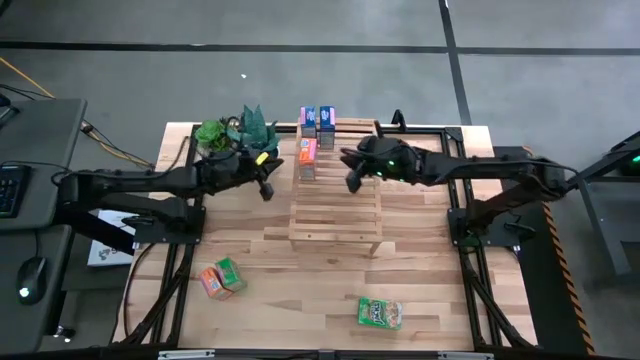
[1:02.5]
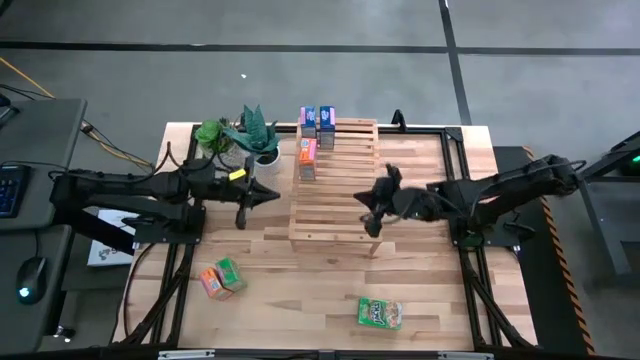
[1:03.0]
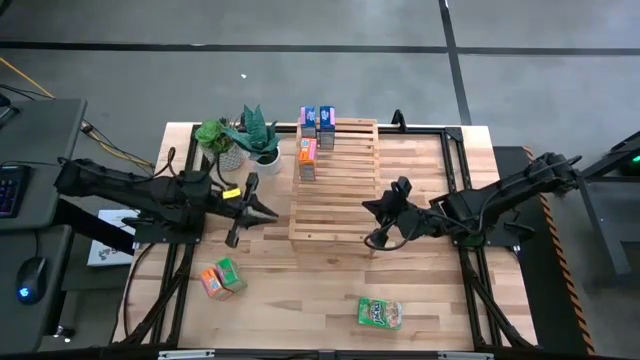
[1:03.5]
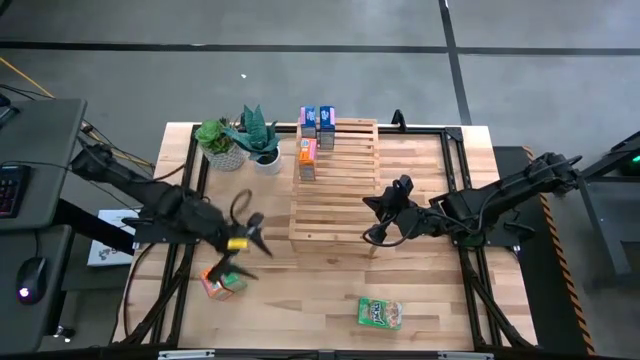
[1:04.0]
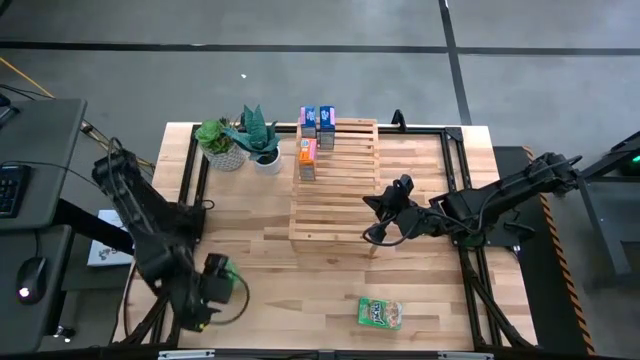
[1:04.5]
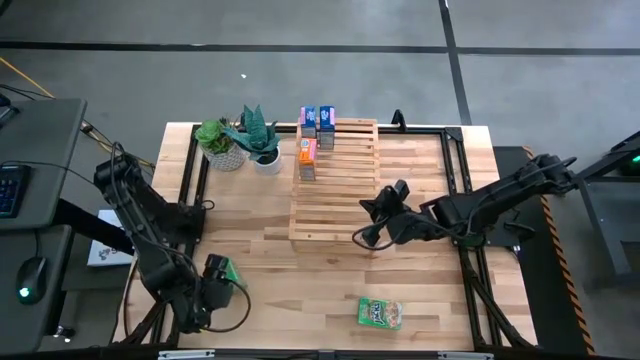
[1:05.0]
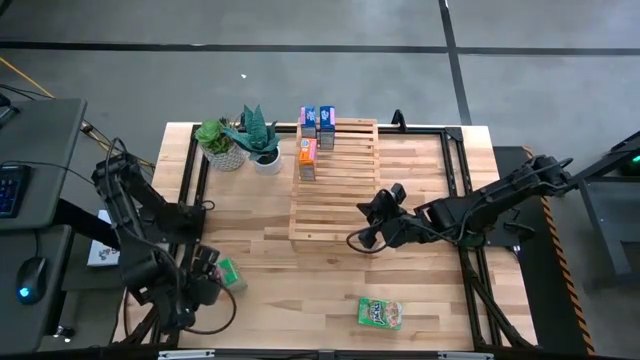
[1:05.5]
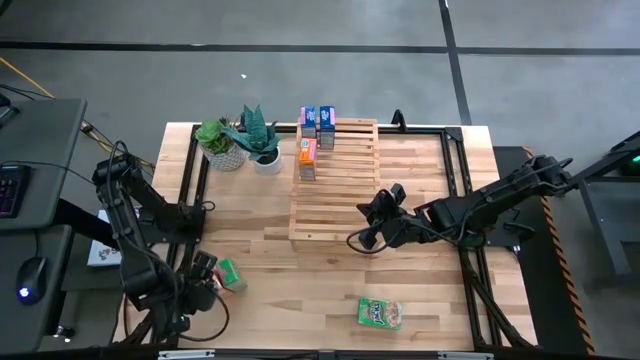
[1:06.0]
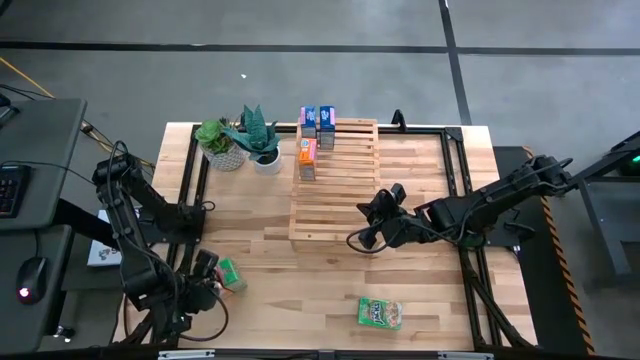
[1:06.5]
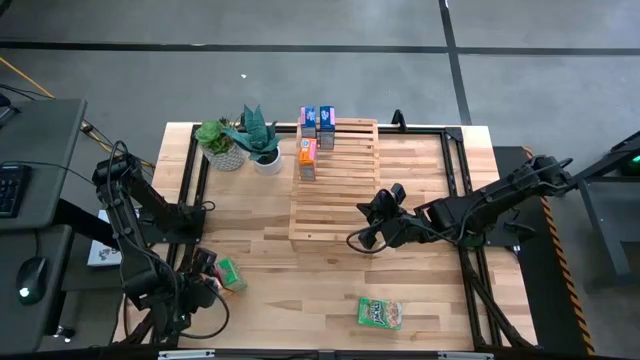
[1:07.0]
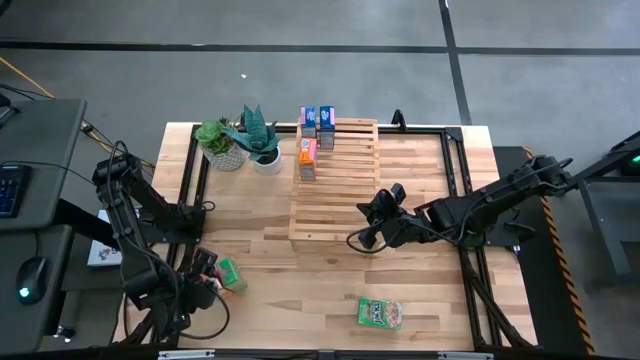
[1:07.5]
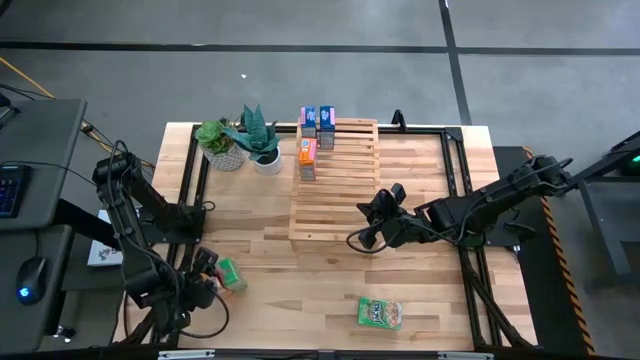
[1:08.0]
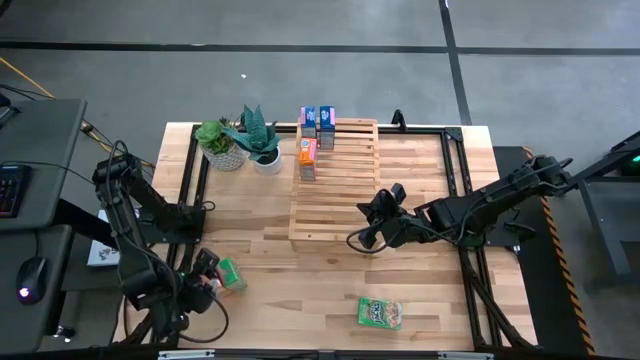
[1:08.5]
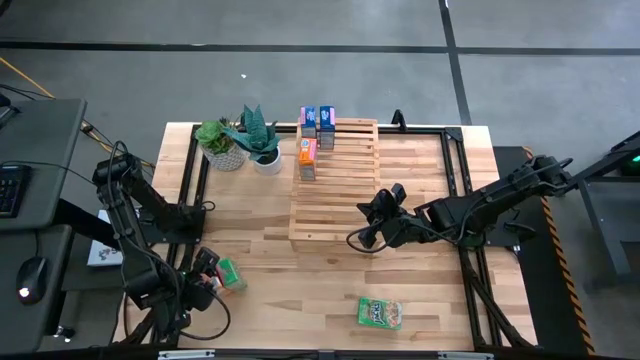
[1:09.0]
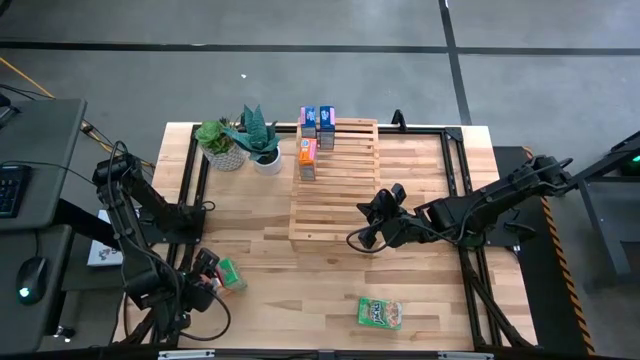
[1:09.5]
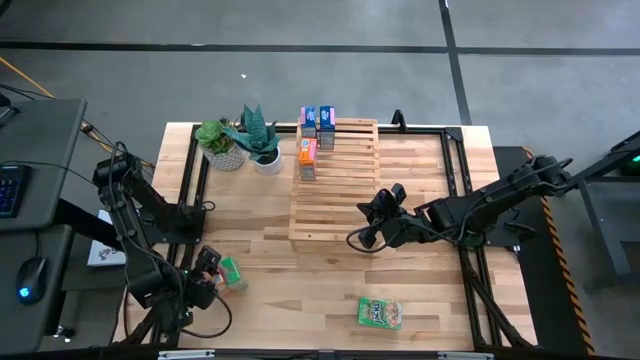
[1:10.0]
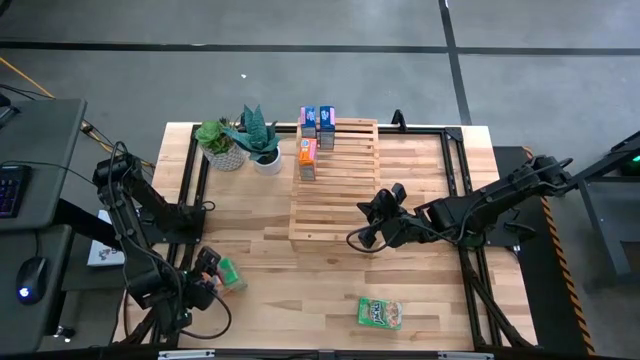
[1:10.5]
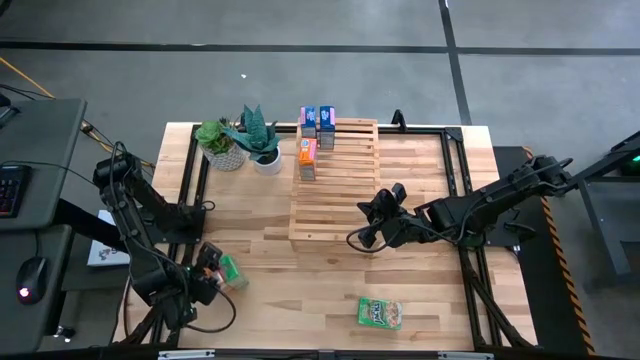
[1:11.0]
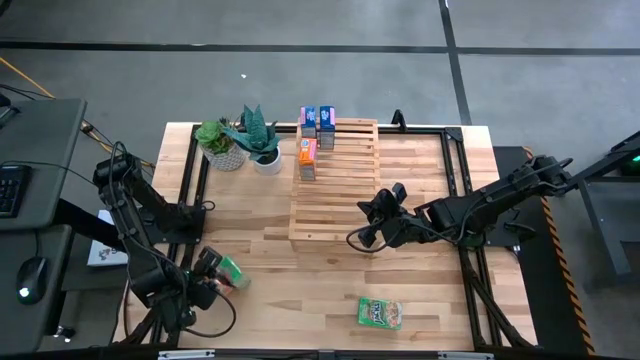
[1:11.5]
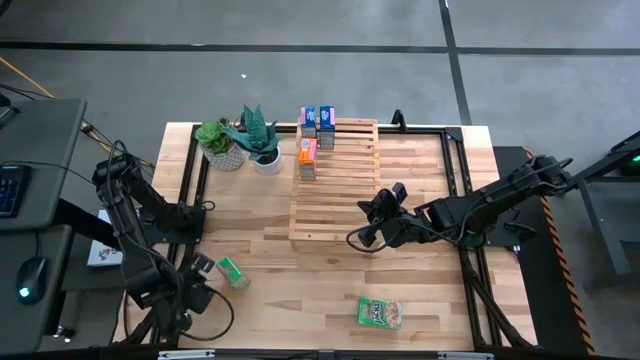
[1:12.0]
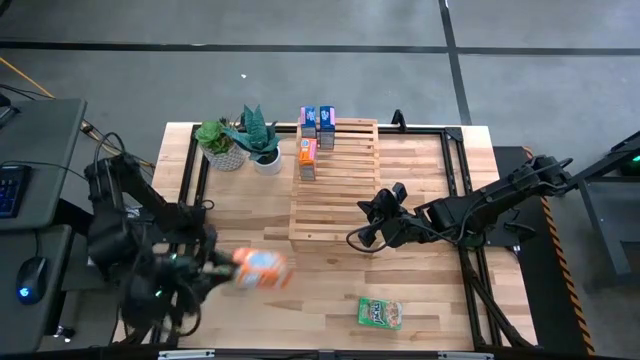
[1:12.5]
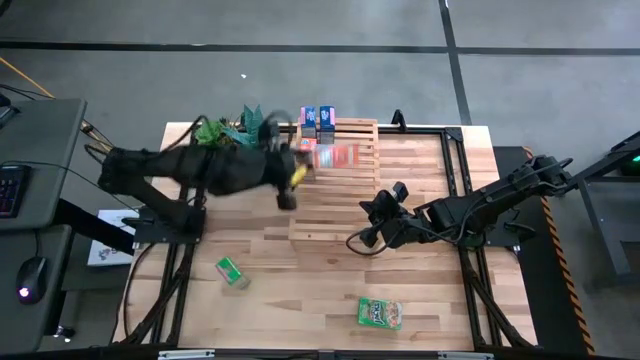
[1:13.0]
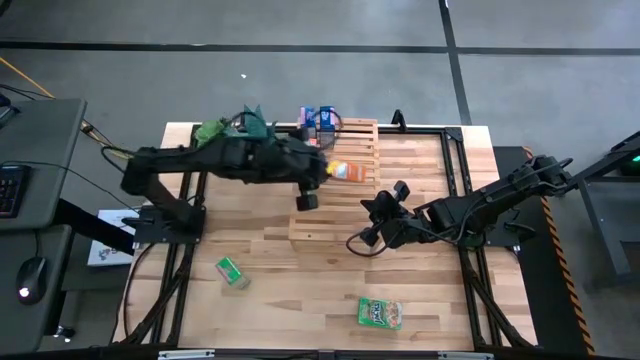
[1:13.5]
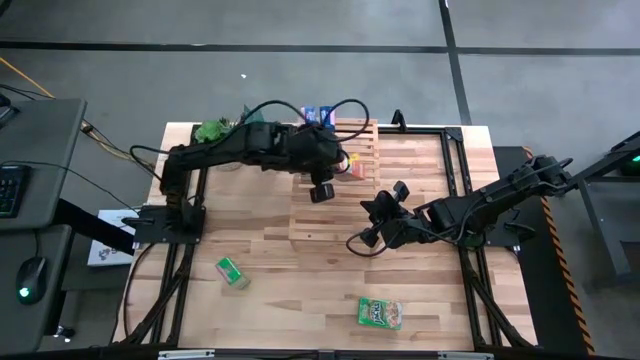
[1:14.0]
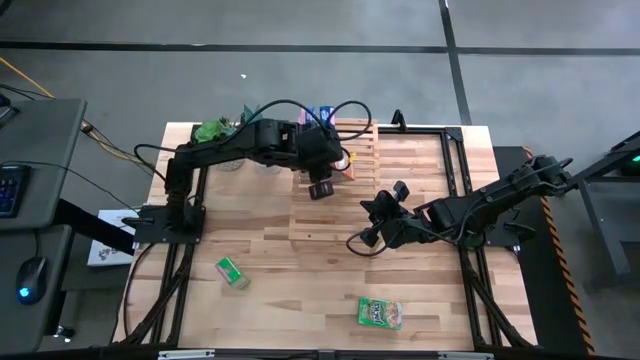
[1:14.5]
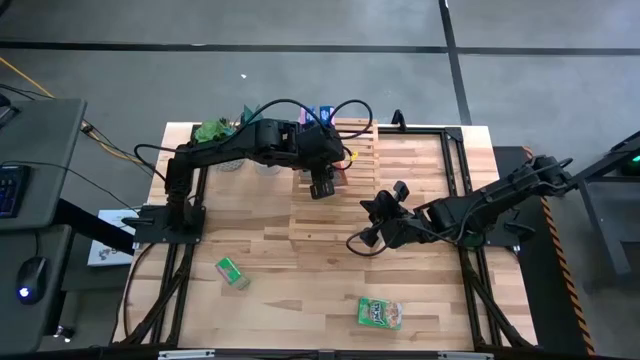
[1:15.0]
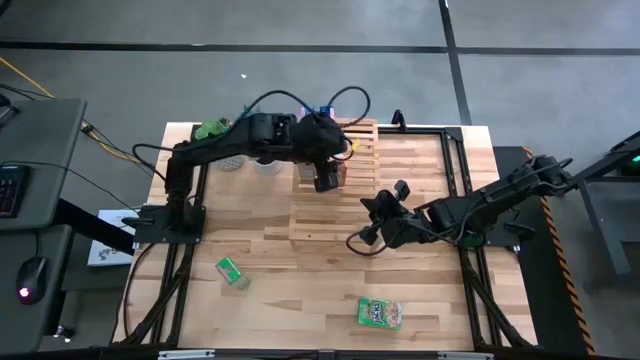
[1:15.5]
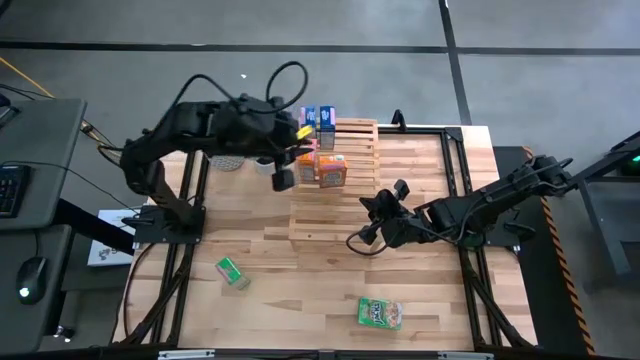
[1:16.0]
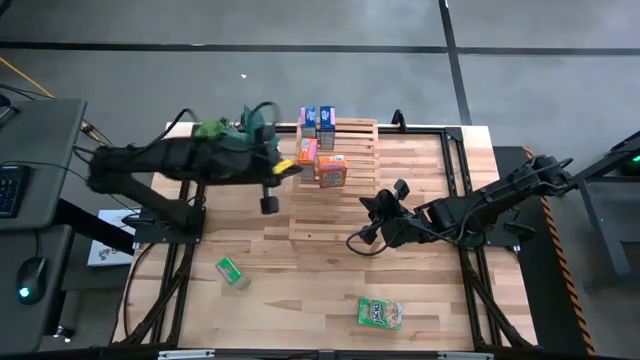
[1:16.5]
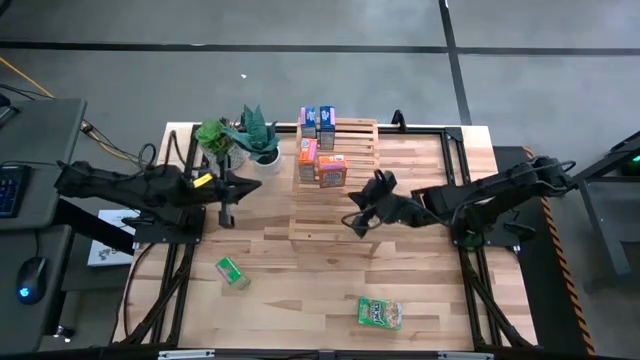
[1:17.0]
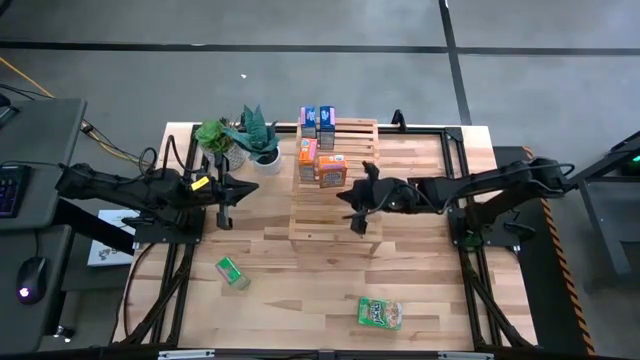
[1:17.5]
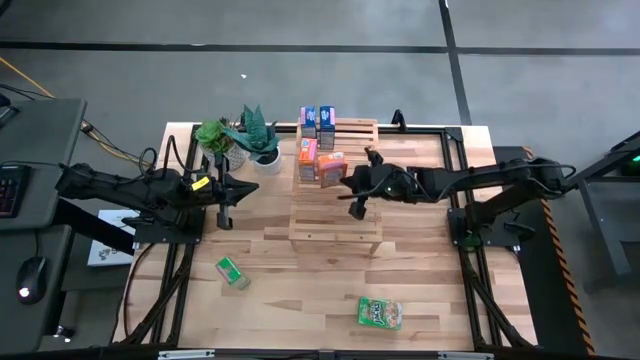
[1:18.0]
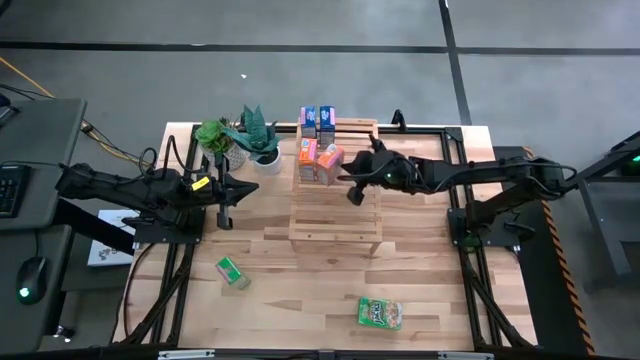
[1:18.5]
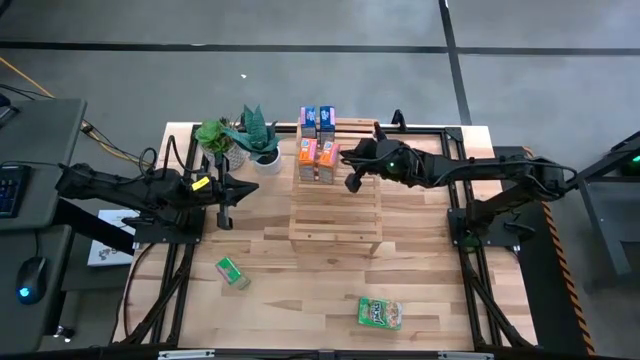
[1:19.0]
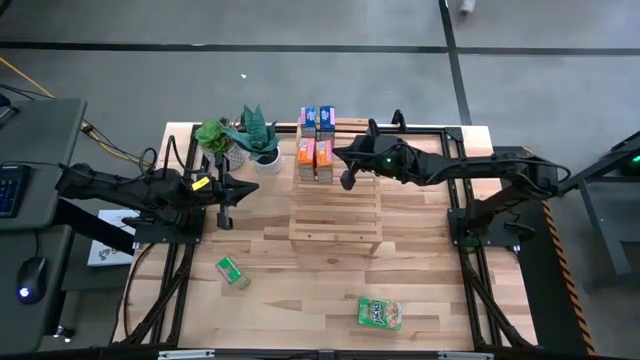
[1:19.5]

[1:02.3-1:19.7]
Task: Stack cereal on shelf
Put the orange cereal box on the shelf aligned with the other orange cereal box
